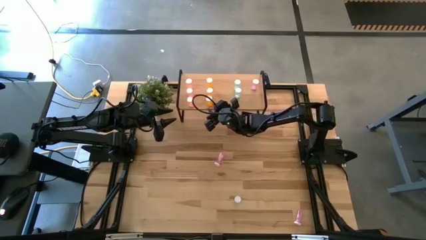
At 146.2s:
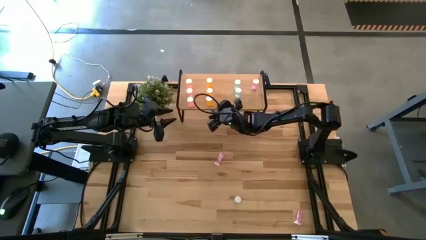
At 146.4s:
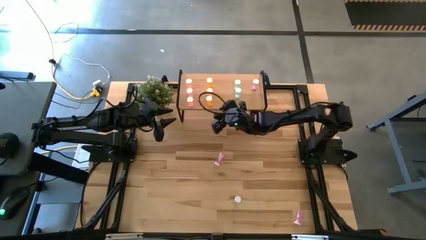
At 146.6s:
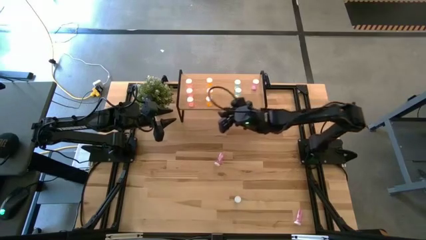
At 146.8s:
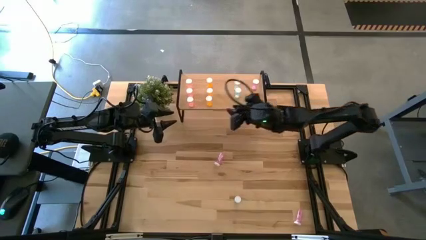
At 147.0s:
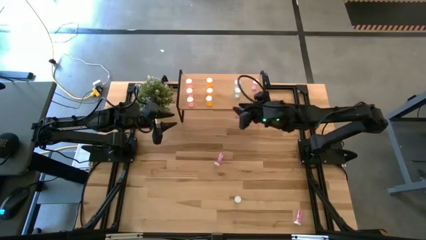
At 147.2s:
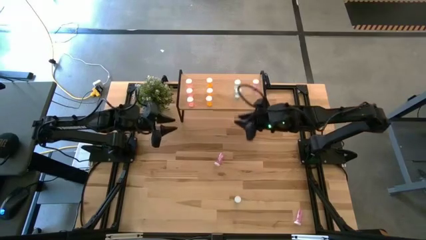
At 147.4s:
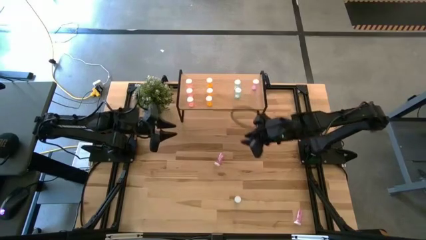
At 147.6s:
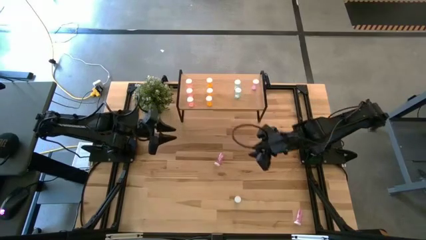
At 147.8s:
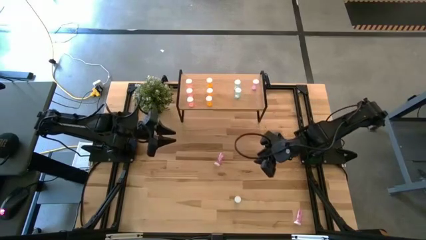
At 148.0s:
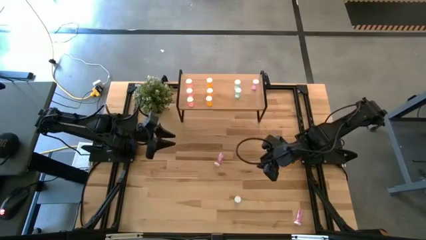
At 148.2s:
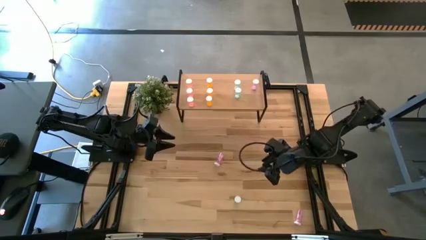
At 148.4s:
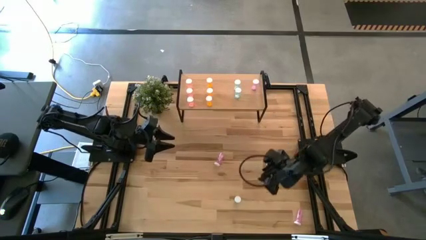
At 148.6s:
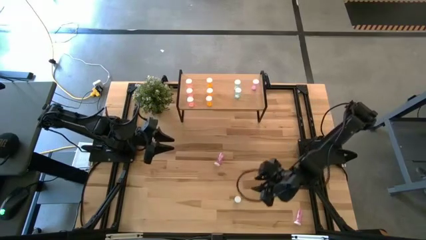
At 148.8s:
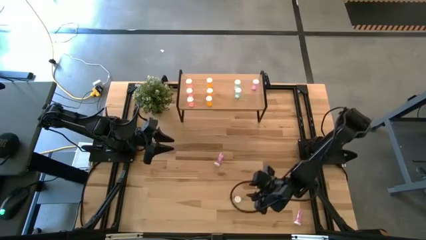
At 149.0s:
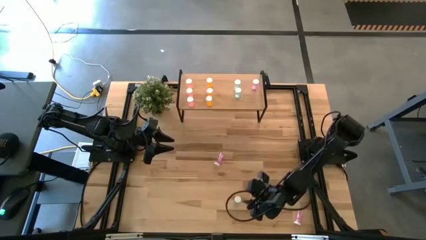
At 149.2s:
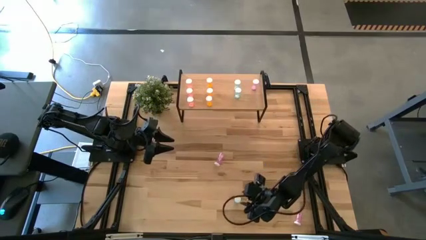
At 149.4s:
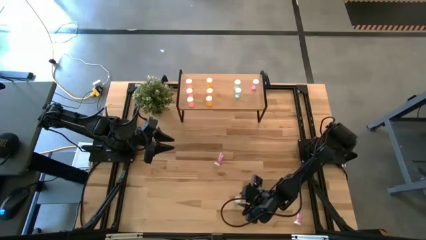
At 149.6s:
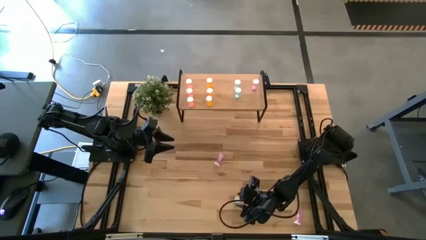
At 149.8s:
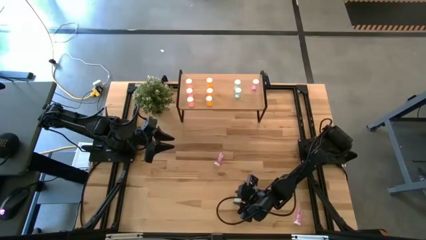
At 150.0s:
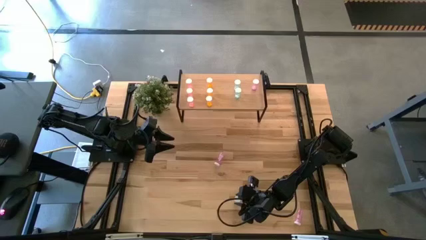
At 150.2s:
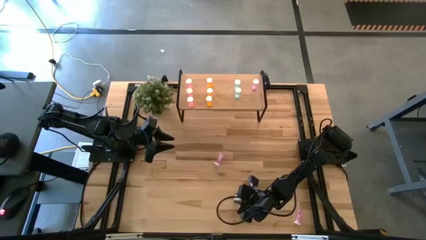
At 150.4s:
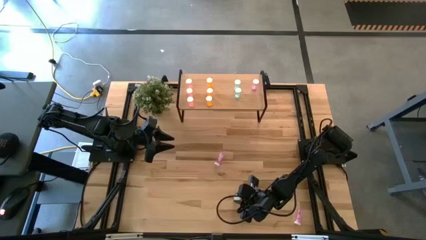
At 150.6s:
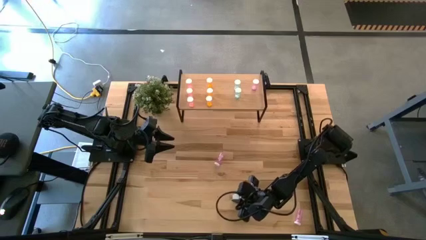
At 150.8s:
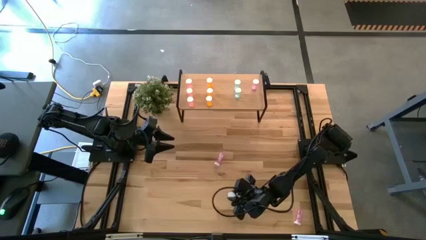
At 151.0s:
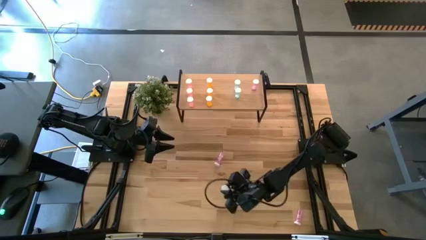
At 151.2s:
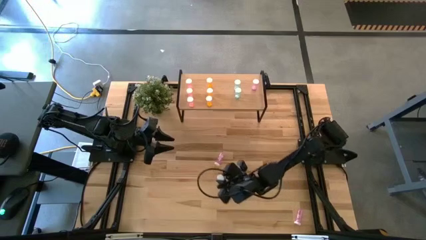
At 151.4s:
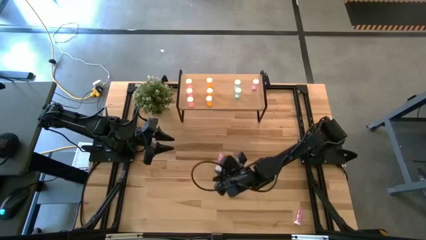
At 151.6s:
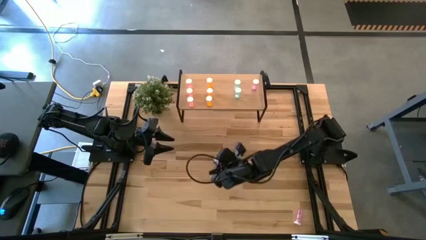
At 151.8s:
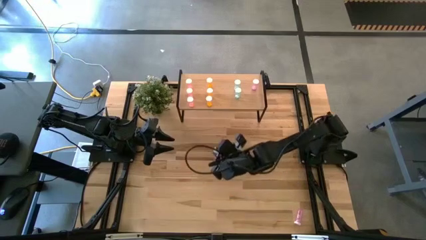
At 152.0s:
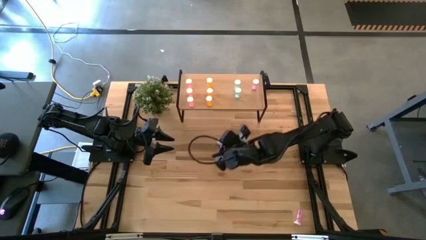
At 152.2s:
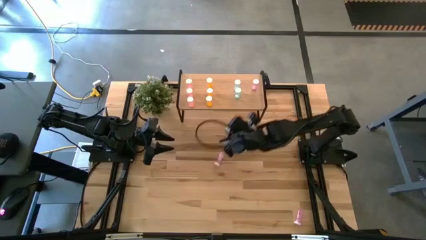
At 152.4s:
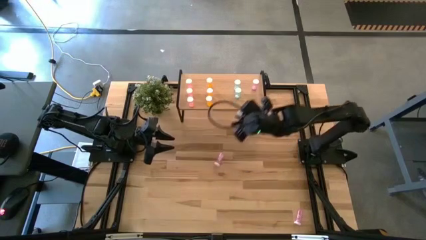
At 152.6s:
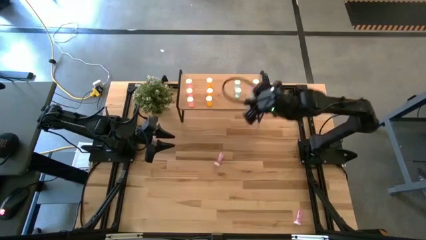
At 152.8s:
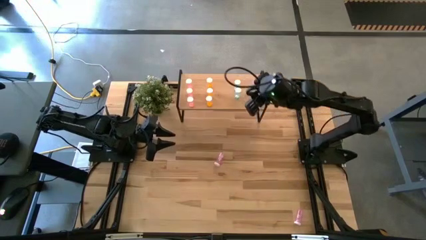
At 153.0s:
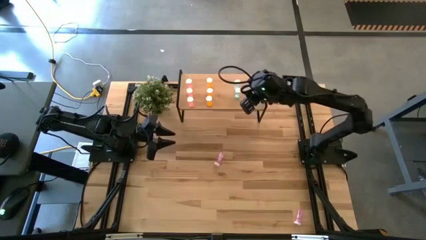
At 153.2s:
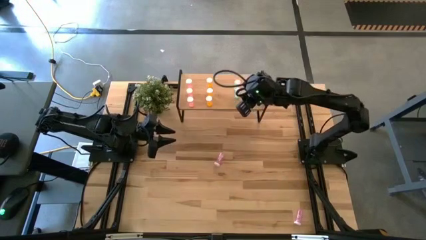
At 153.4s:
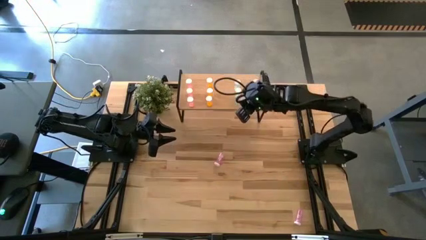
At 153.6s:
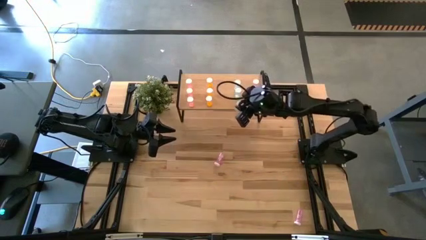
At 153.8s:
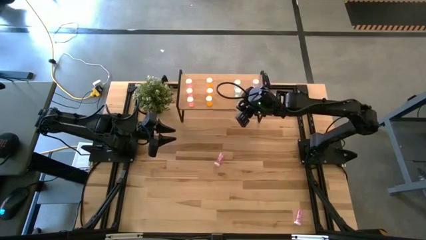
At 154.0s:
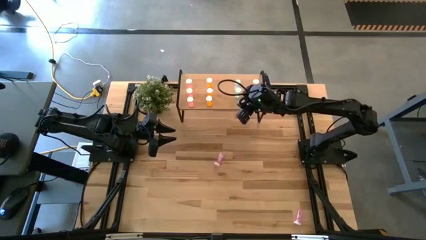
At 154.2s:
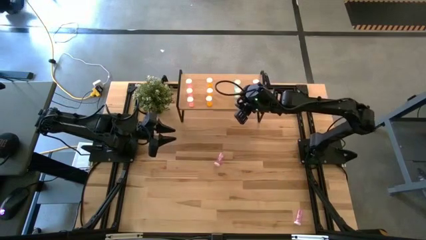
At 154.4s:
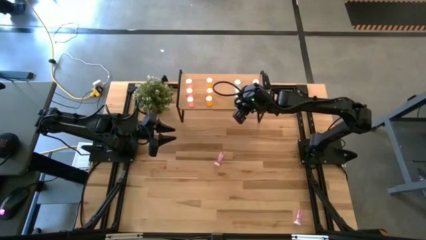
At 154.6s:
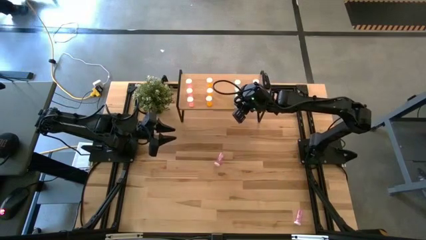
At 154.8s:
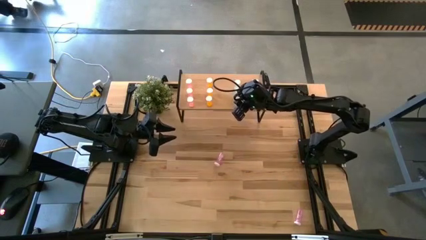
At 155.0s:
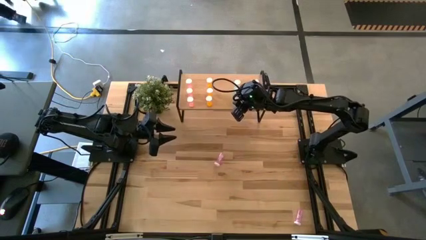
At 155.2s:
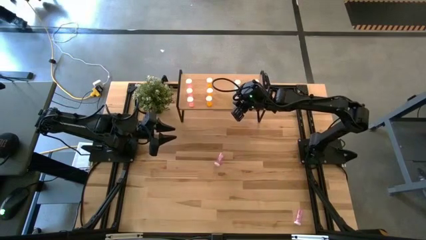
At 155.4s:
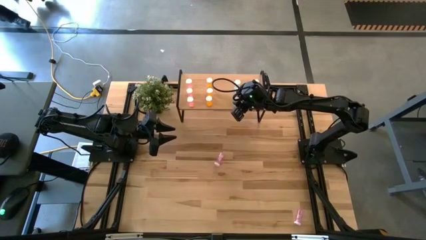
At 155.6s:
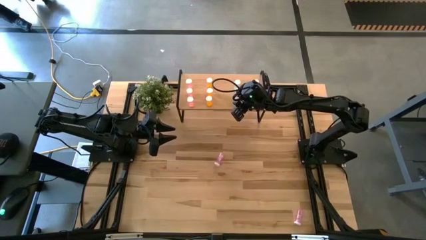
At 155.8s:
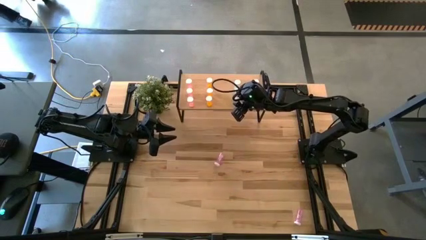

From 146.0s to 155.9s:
Task: Pick and place medicine bottles onto shelf by color
Put the blue pill bottle on the shelf aligned with the other blue pill bottles
